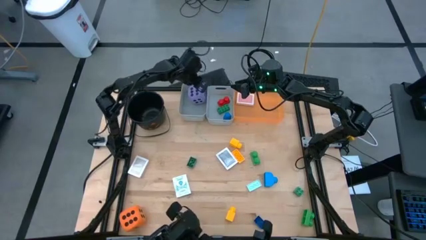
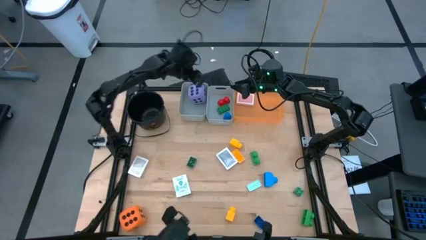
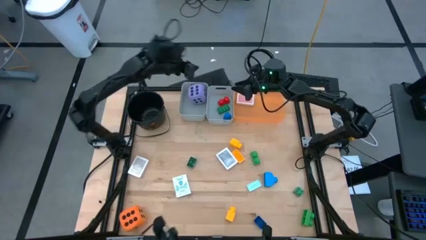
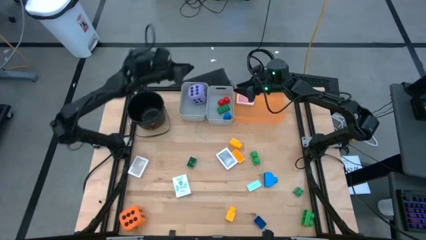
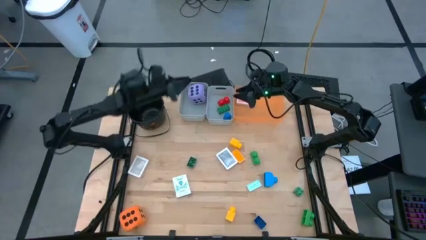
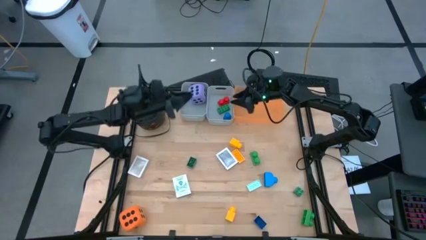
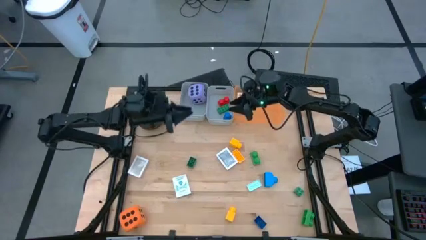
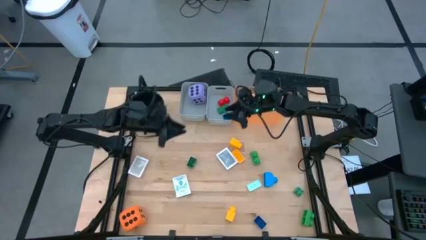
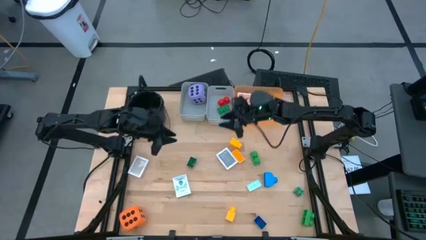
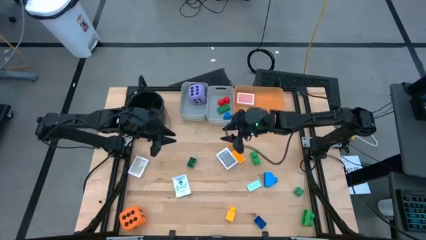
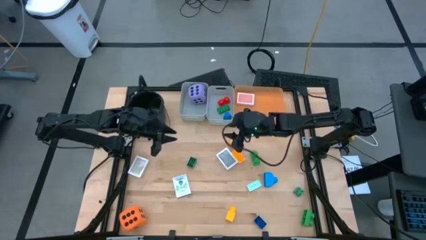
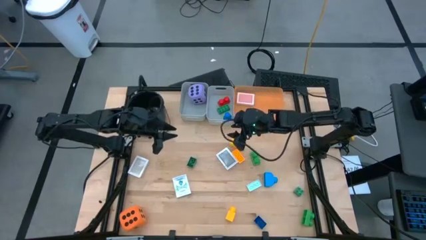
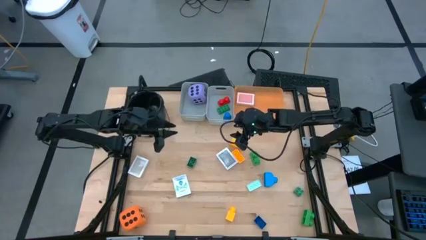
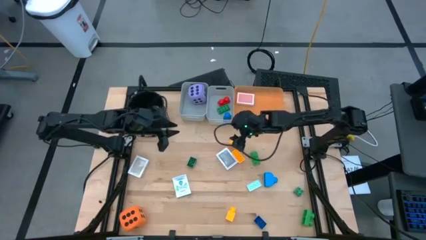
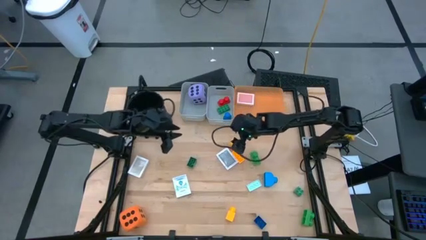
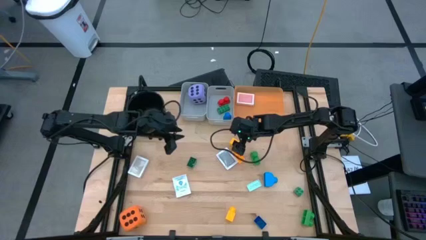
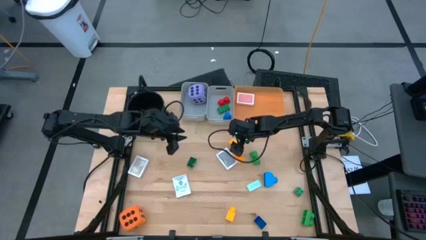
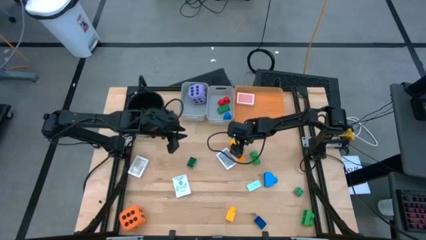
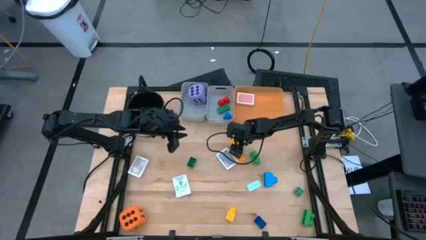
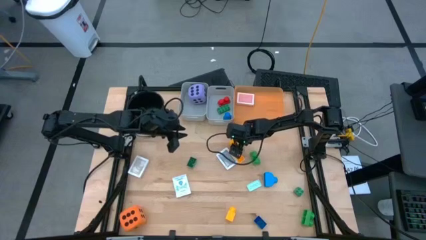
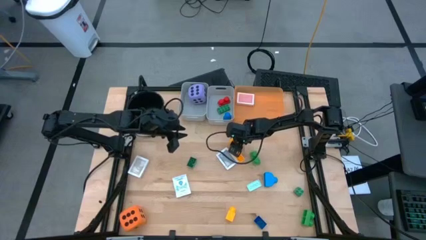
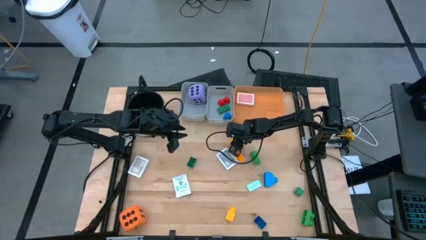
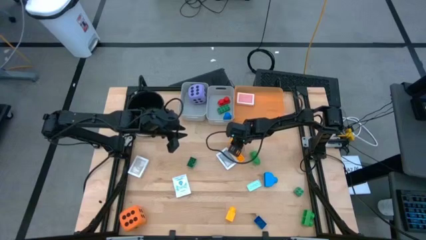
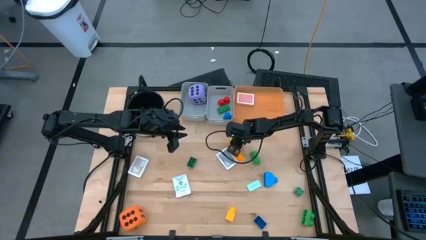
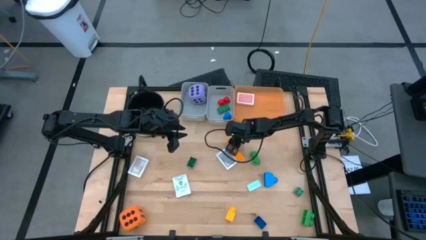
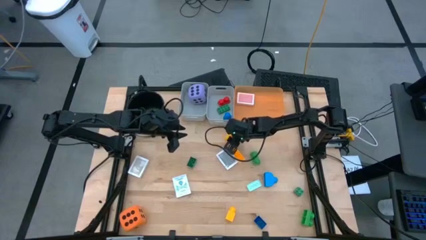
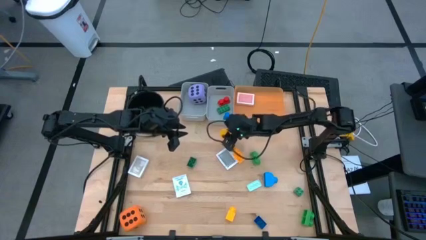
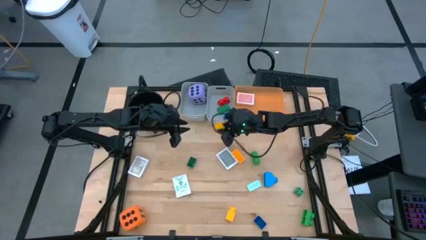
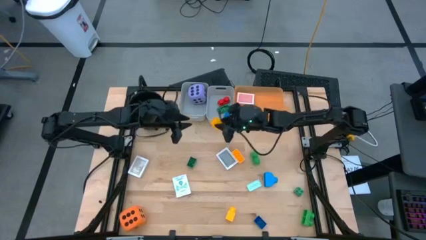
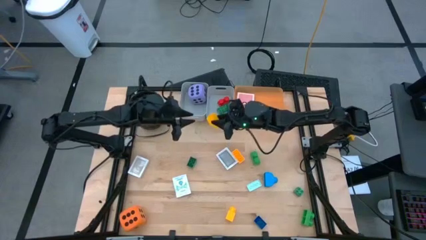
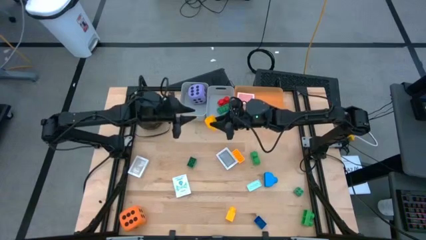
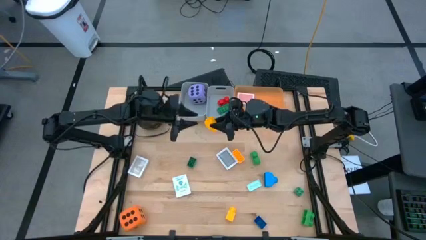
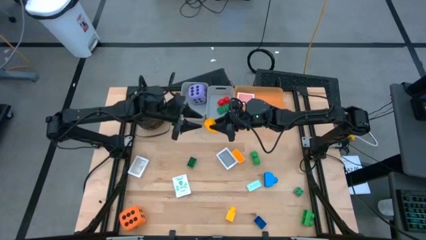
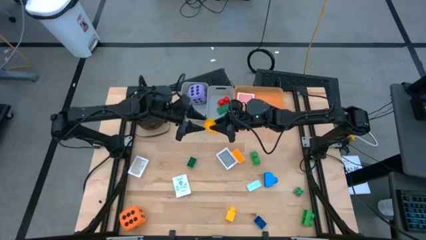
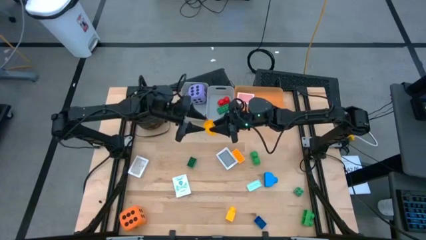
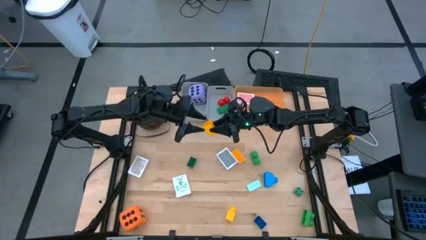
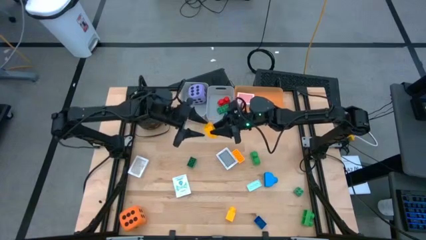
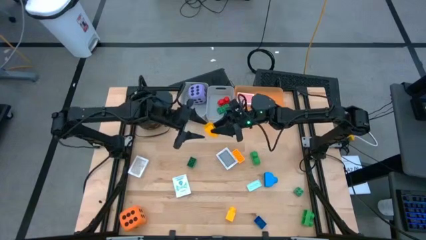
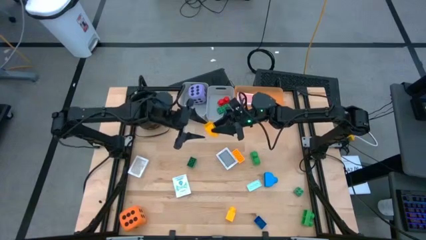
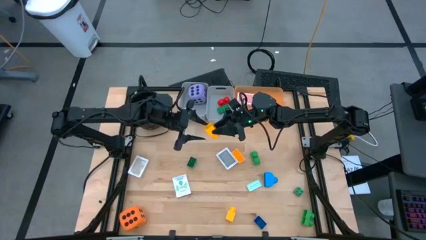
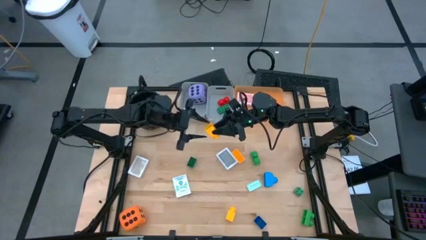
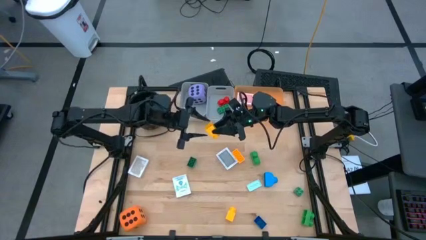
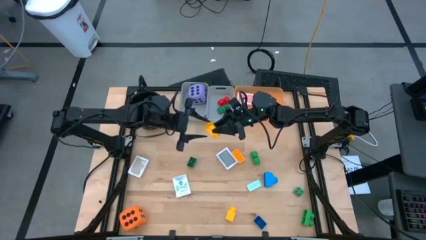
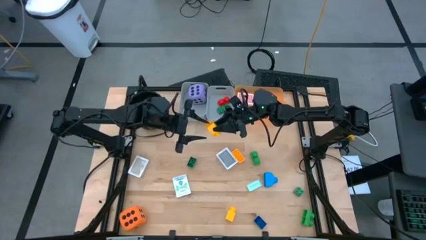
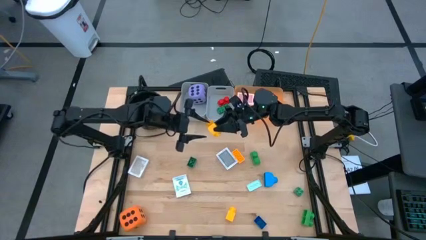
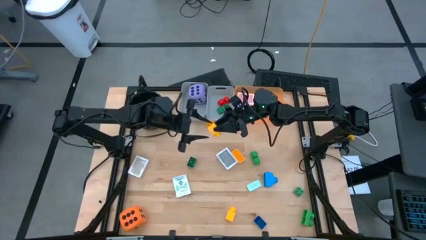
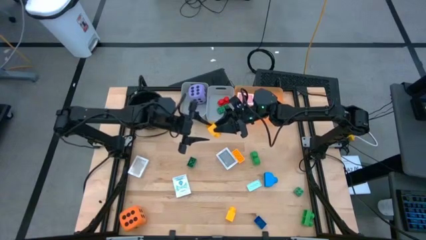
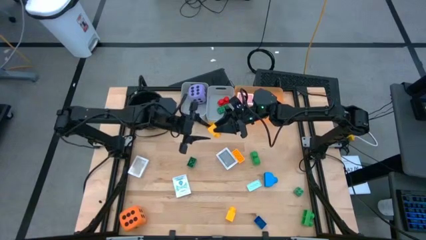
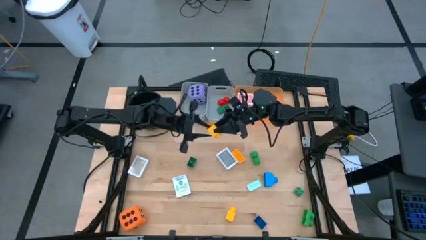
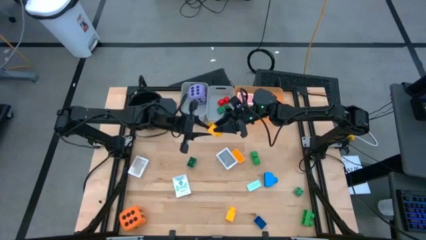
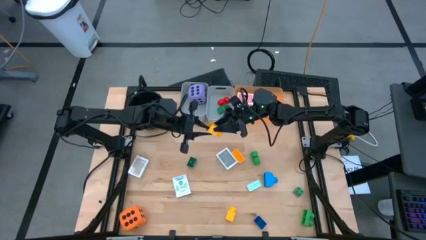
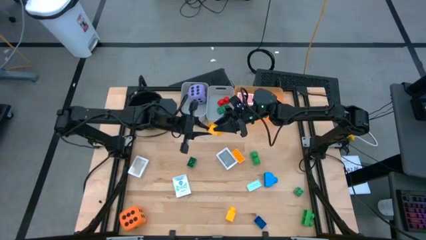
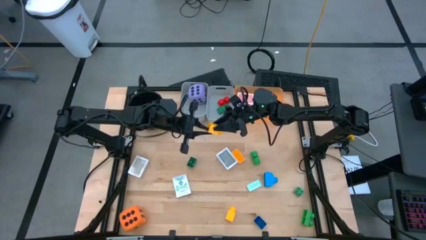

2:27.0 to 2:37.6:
Task: Pick & Place Toys
Put the yellow gamepiece into the right gray bin
